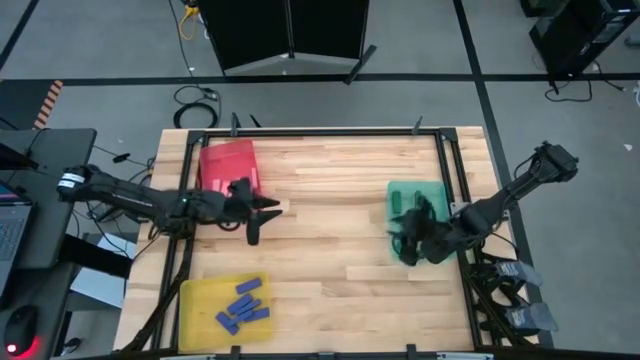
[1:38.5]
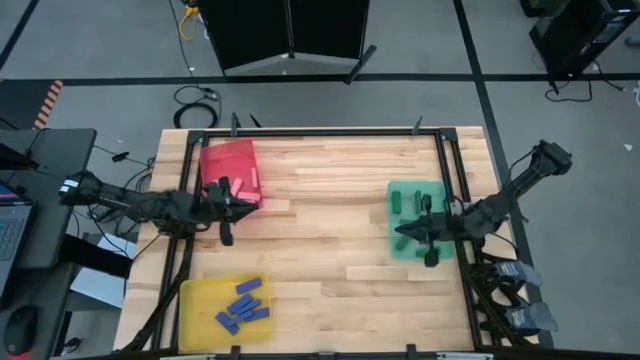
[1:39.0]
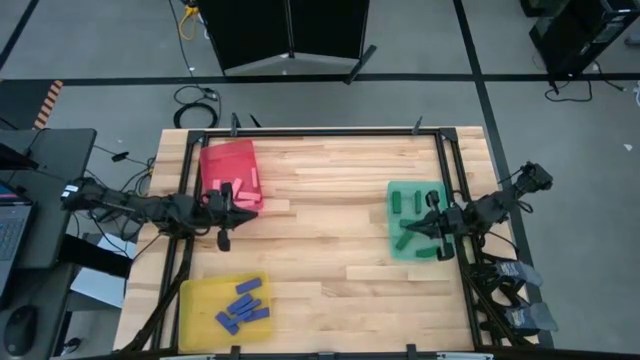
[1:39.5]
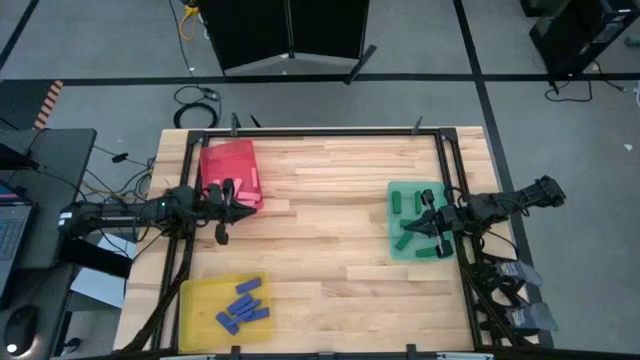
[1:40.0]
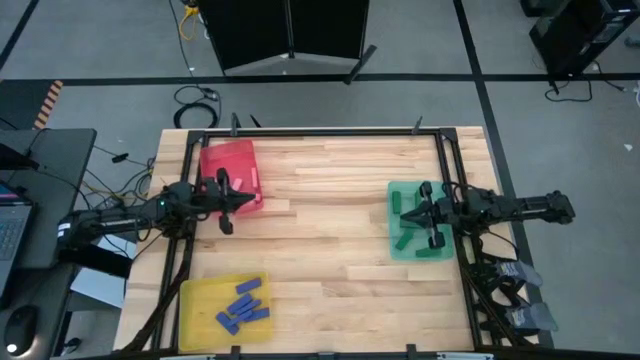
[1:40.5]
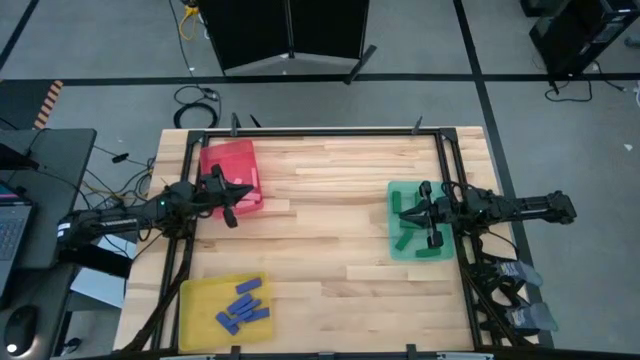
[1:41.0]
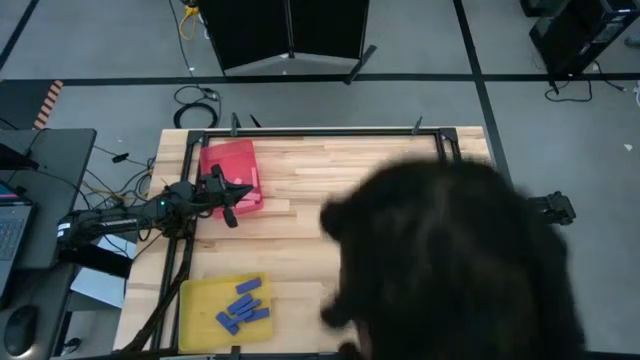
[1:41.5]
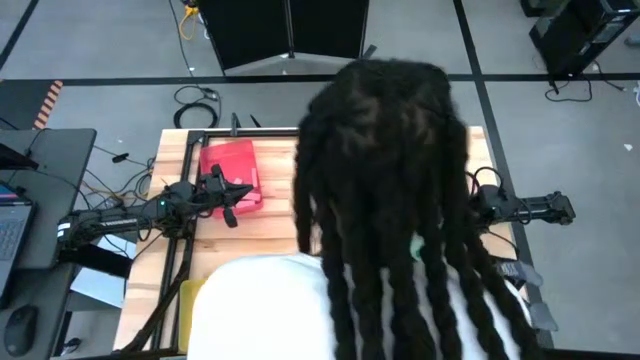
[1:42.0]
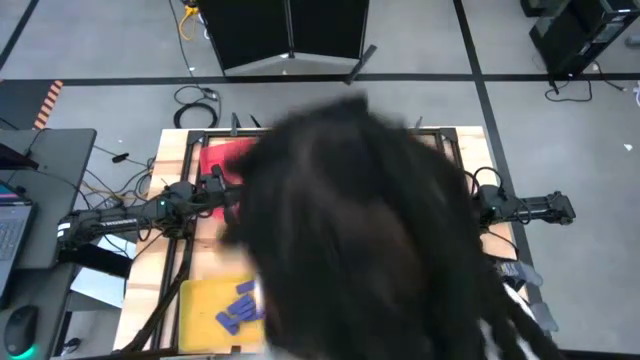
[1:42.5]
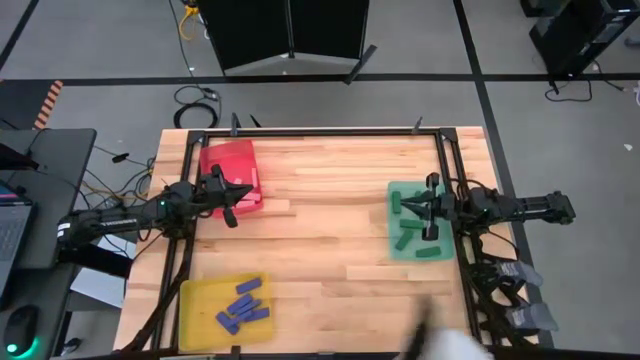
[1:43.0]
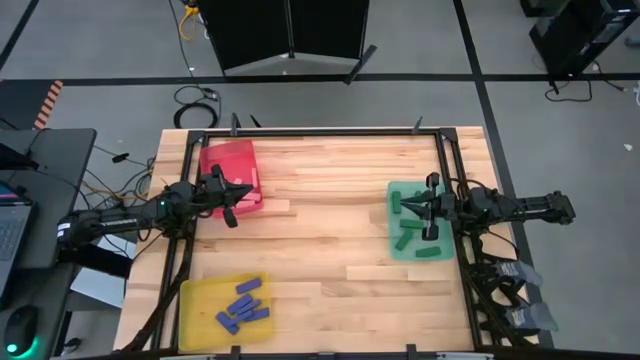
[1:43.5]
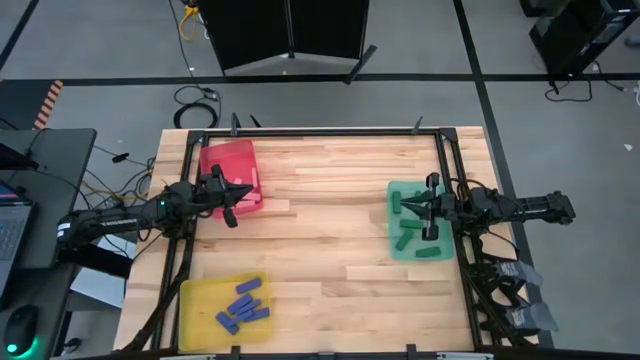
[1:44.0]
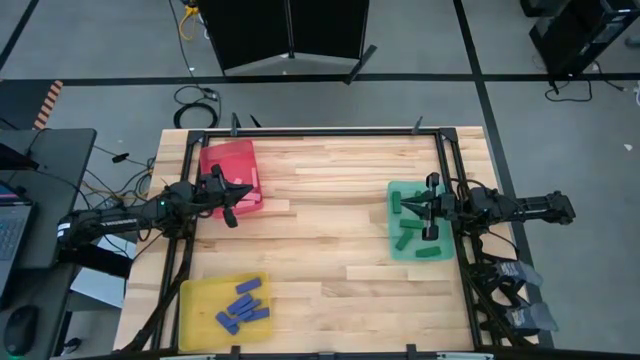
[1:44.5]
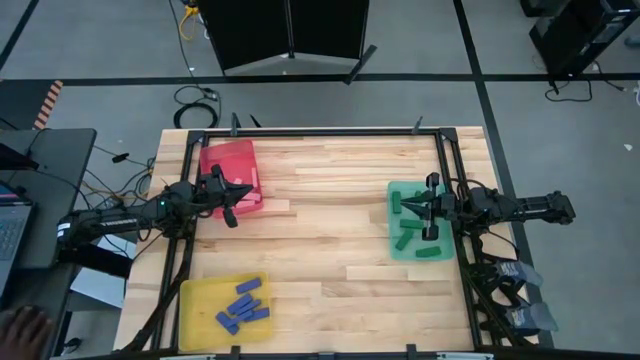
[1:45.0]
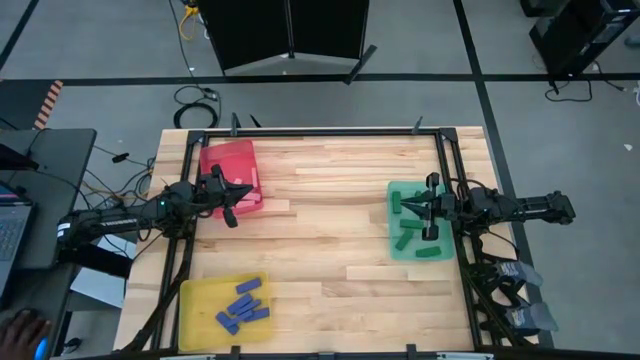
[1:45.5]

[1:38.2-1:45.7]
Task: Sort blocks
Return to Home Position

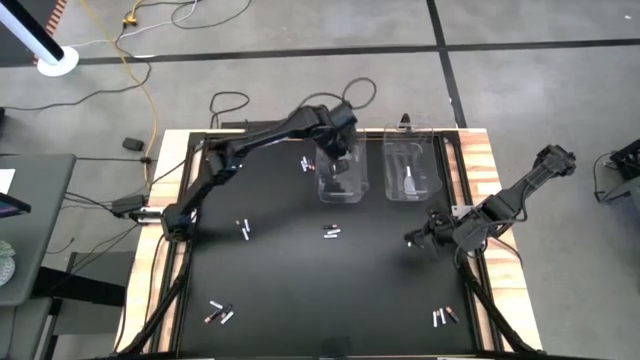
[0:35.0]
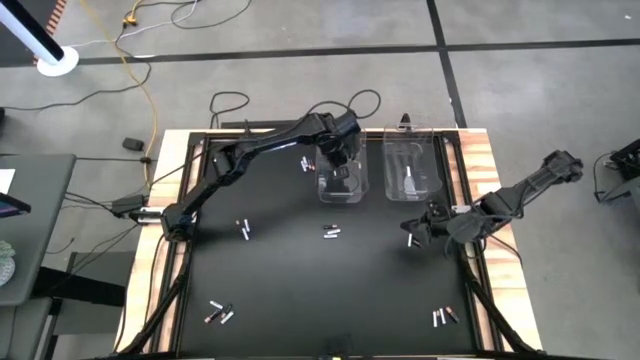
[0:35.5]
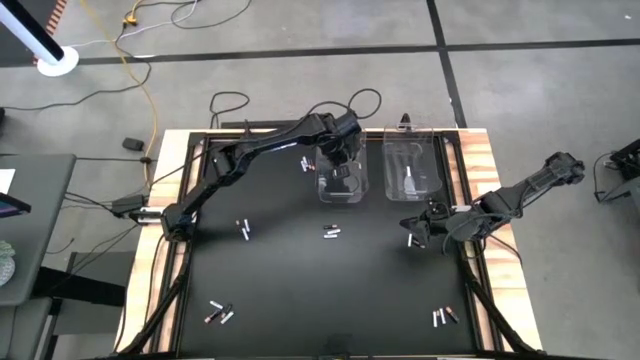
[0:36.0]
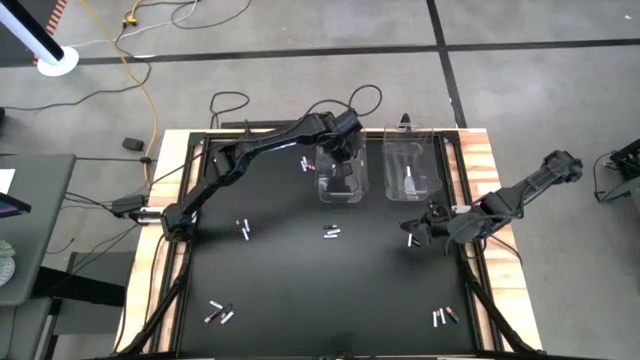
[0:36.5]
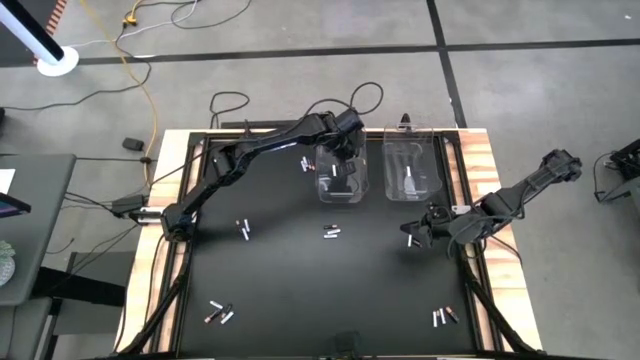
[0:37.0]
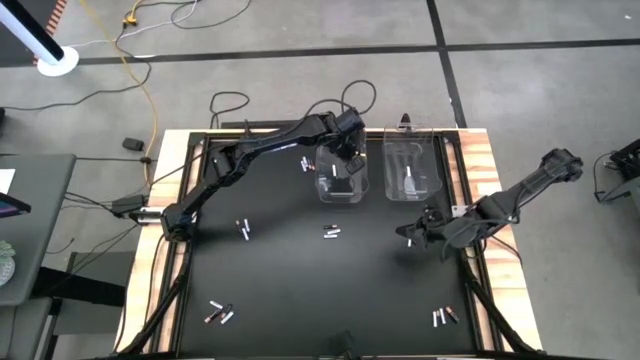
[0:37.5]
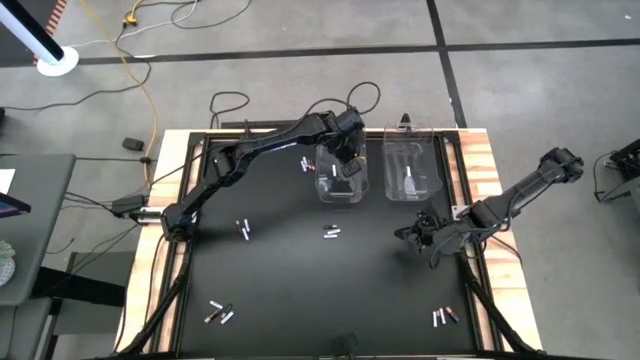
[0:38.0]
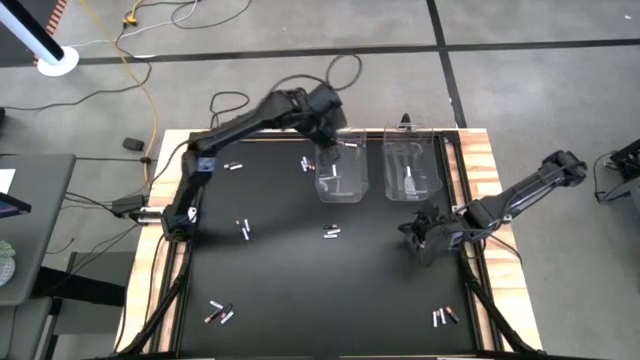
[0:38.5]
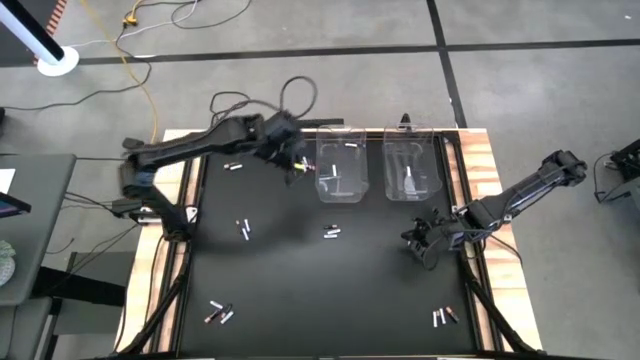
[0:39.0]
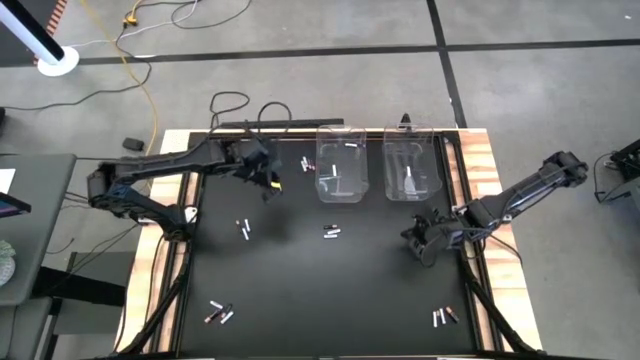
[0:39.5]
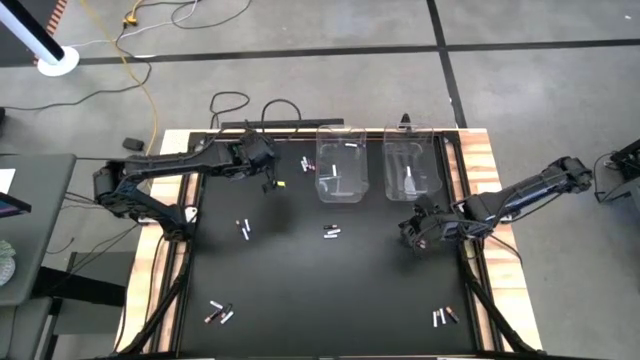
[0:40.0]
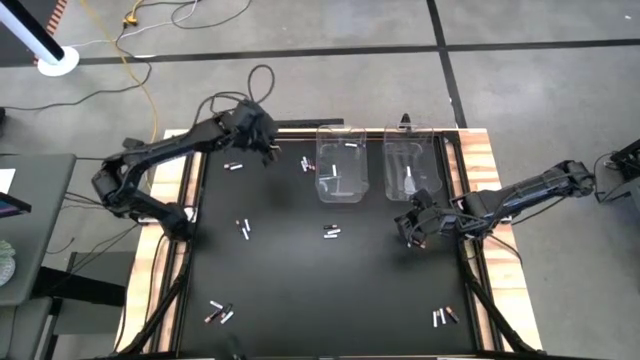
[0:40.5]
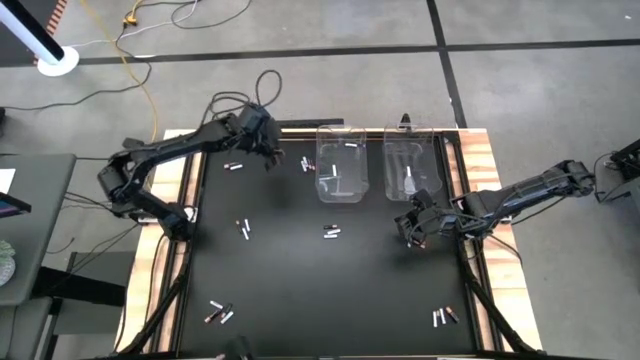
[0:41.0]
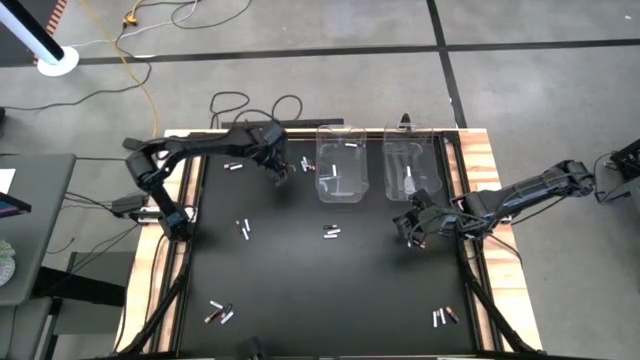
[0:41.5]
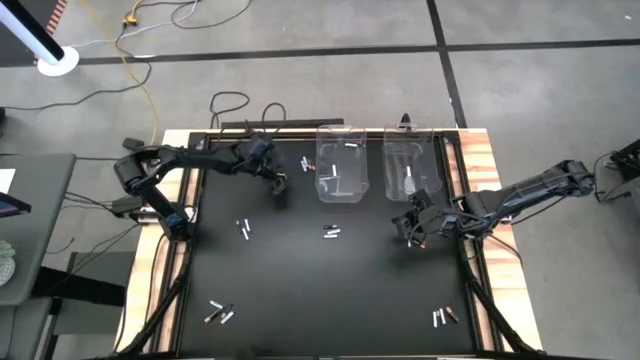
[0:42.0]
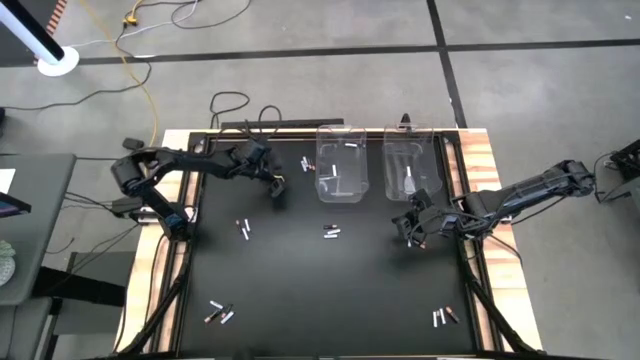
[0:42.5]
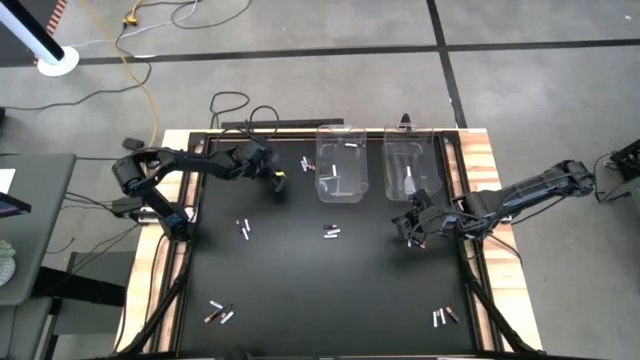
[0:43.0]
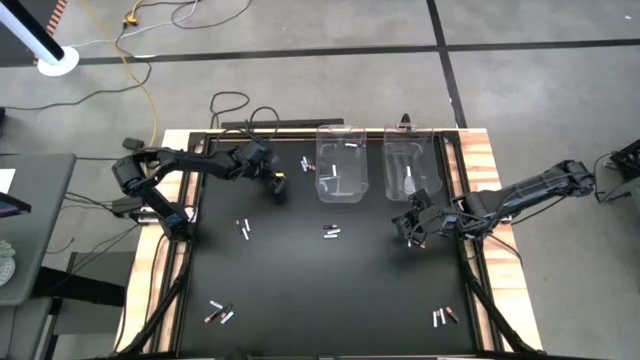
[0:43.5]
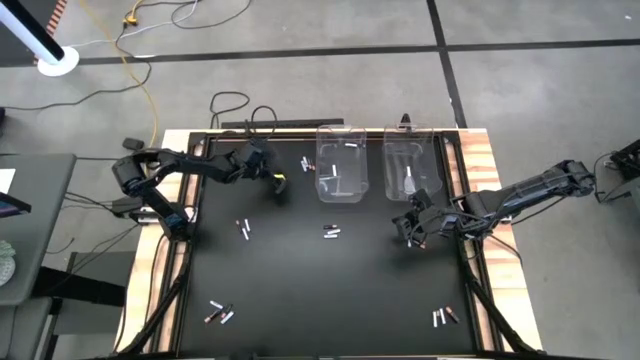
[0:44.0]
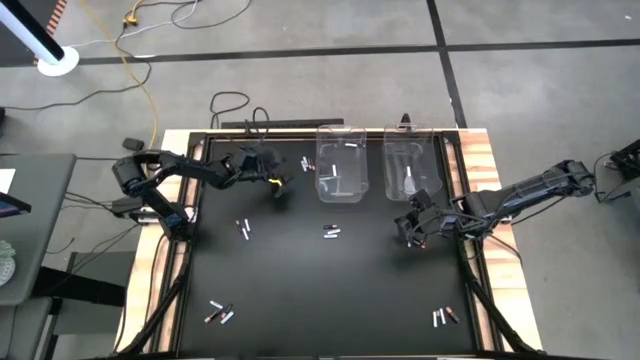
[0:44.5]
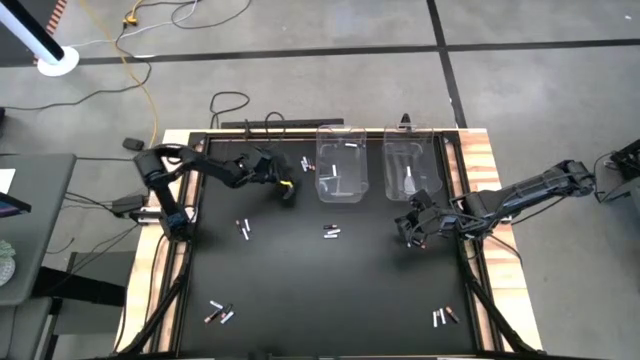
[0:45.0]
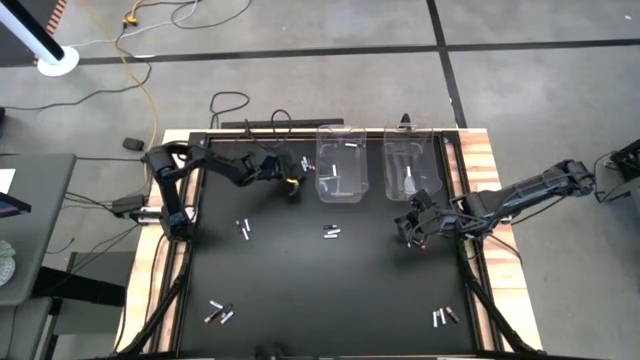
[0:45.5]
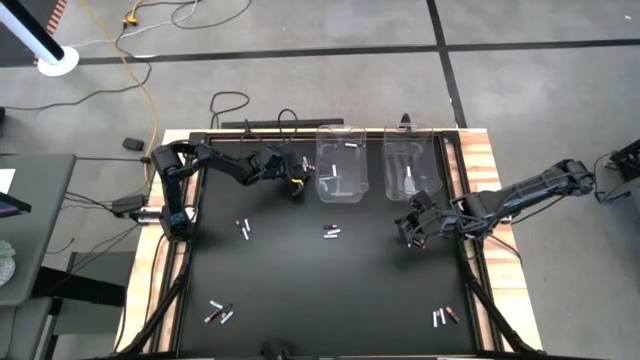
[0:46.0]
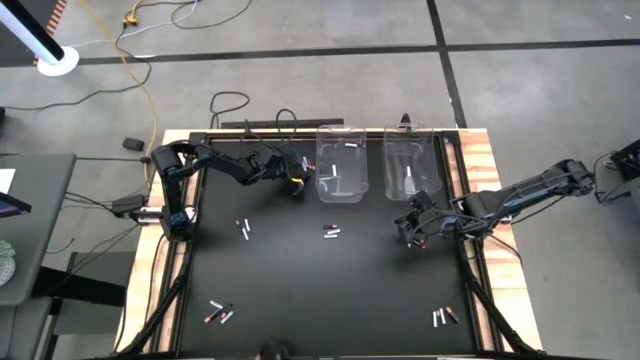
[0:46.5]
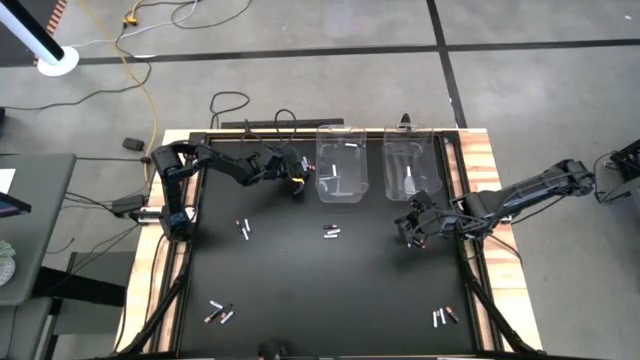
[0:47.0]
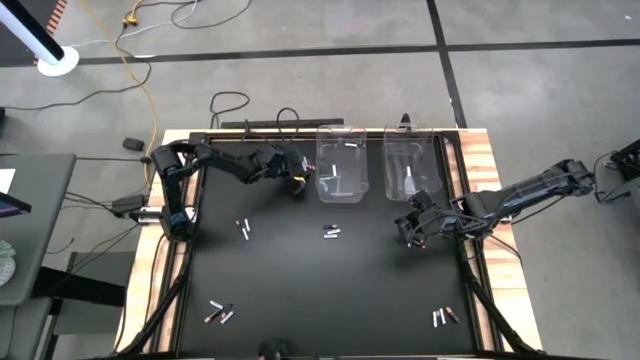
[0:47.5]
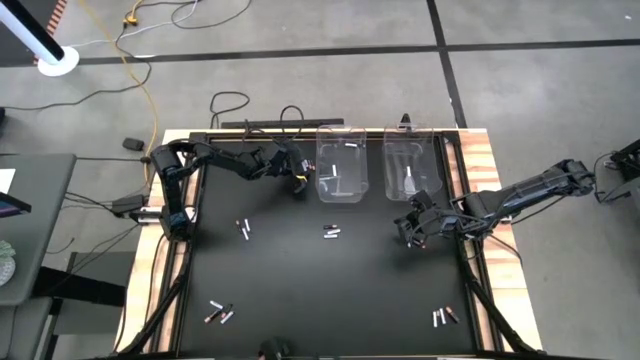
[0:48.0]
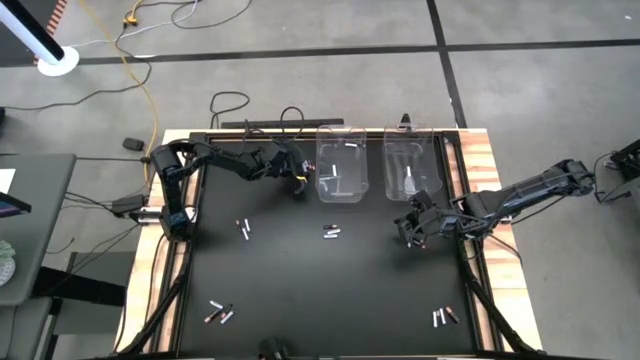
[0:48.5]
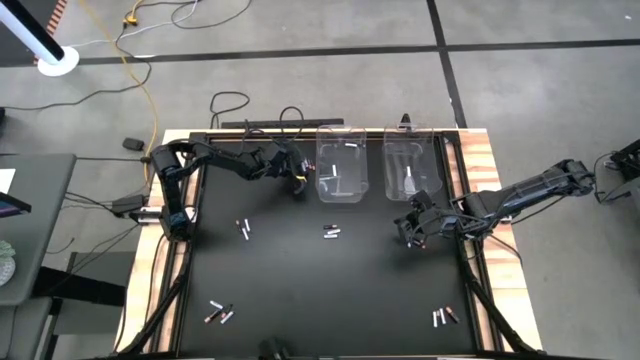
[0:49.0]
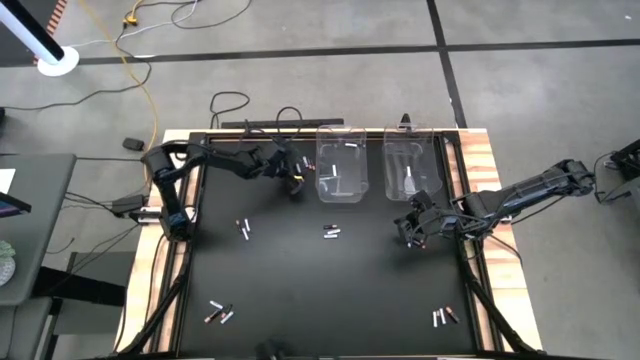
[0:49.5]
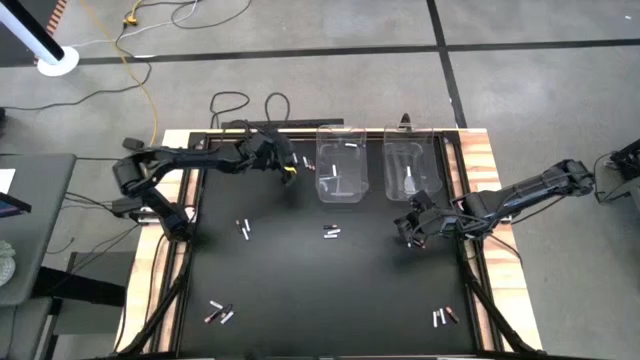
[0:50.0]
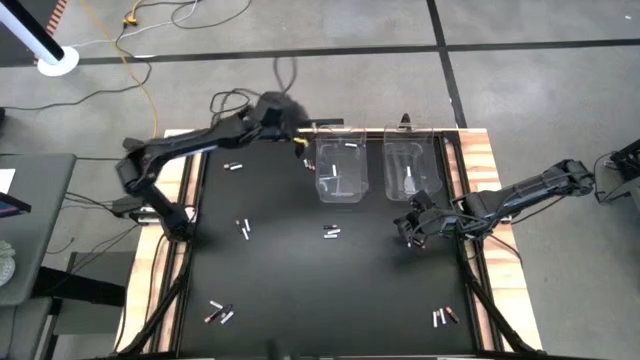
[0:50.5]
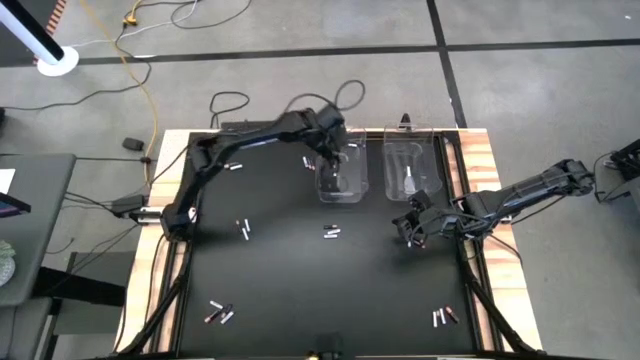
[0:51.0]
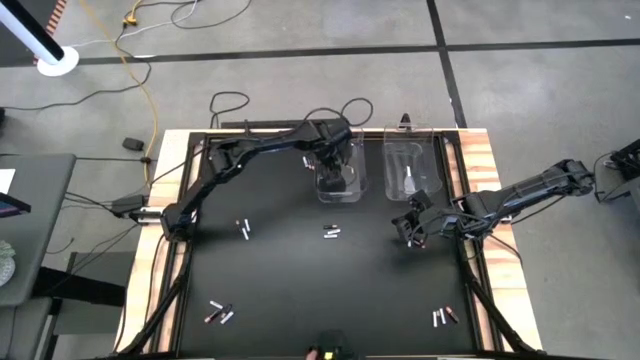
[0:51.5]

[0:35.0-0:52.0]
Task: Sort batteries
Put the white battery into the left transparent bin
